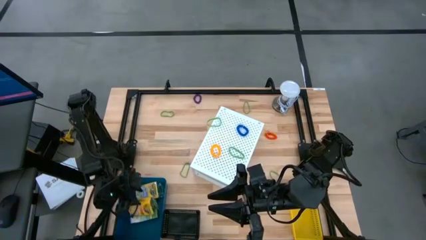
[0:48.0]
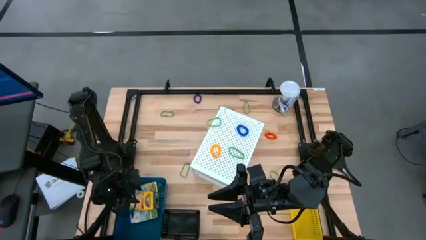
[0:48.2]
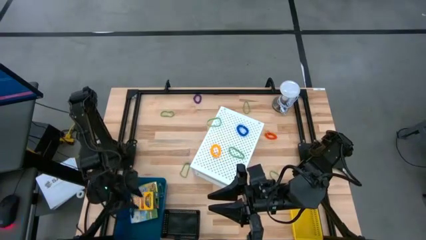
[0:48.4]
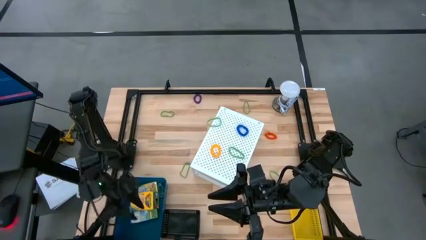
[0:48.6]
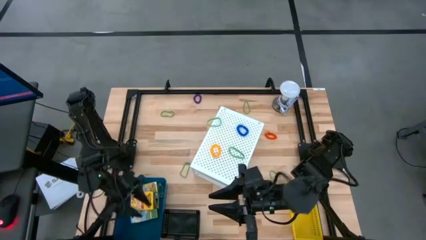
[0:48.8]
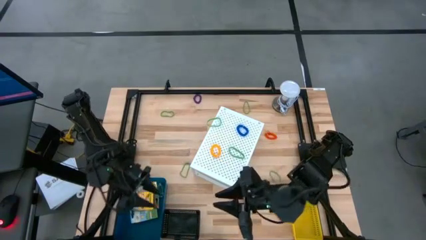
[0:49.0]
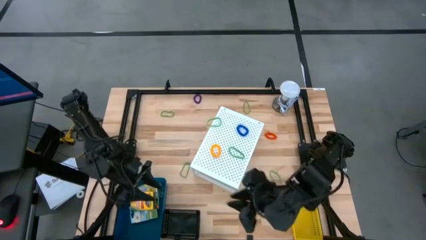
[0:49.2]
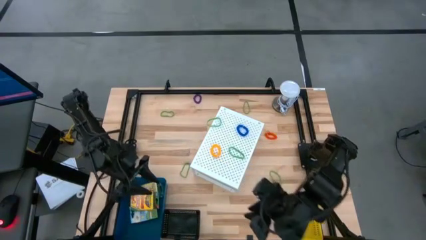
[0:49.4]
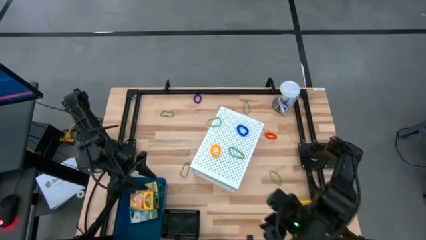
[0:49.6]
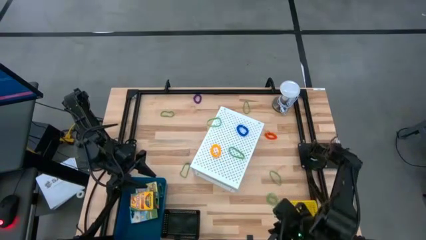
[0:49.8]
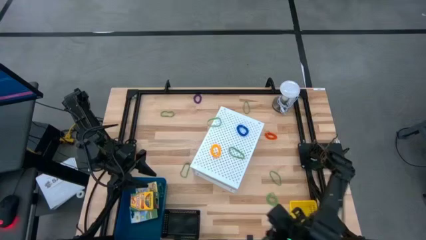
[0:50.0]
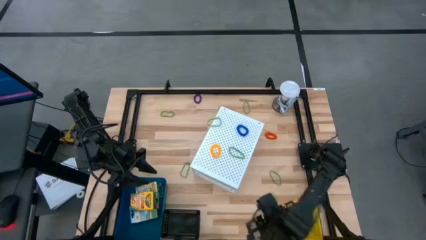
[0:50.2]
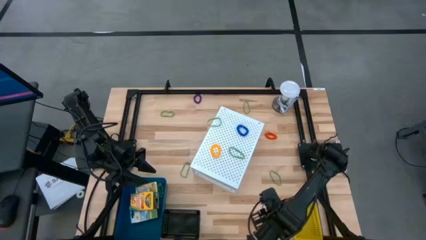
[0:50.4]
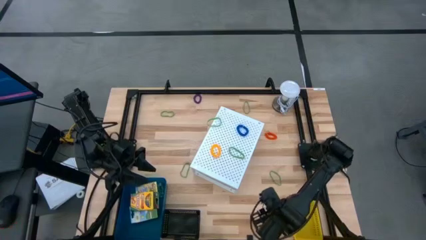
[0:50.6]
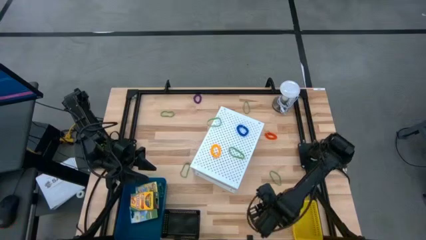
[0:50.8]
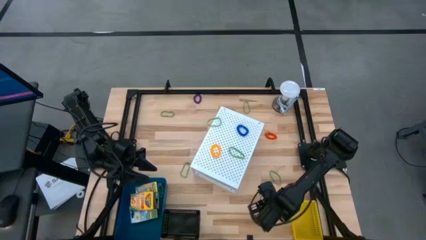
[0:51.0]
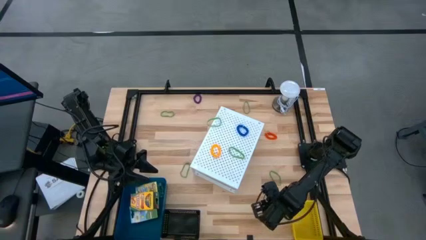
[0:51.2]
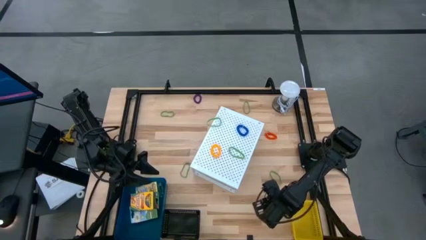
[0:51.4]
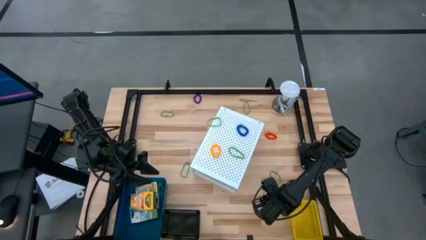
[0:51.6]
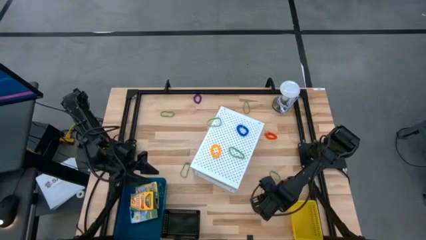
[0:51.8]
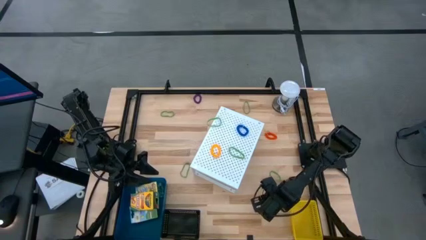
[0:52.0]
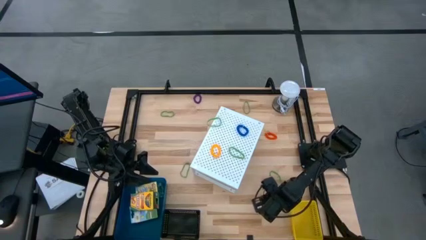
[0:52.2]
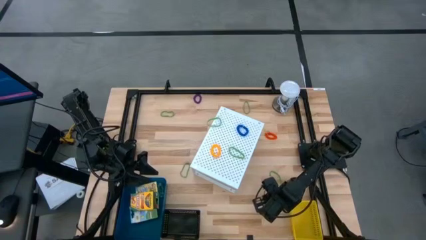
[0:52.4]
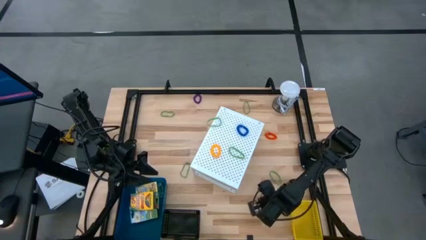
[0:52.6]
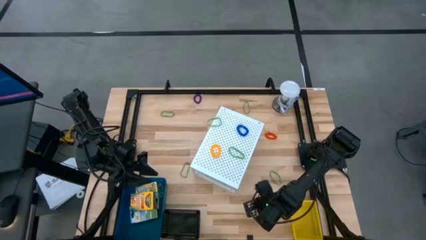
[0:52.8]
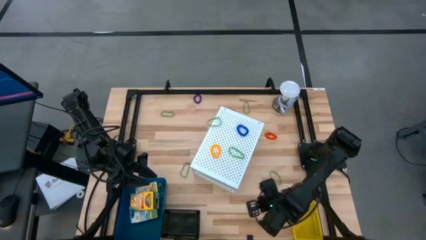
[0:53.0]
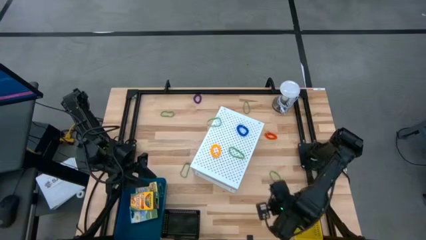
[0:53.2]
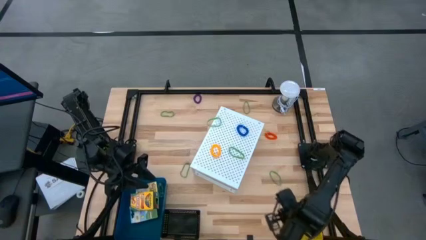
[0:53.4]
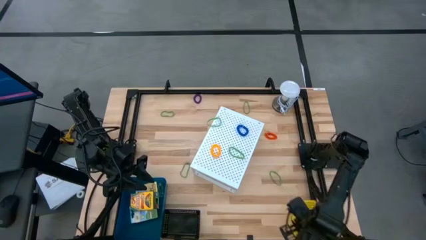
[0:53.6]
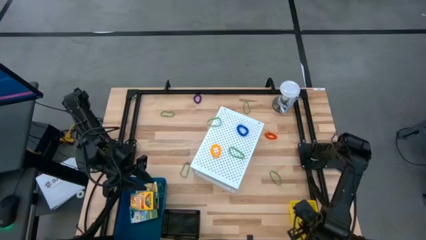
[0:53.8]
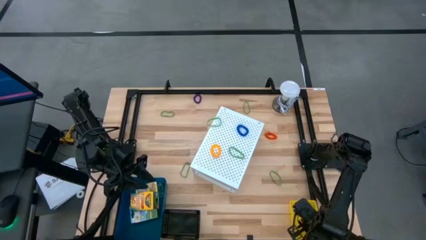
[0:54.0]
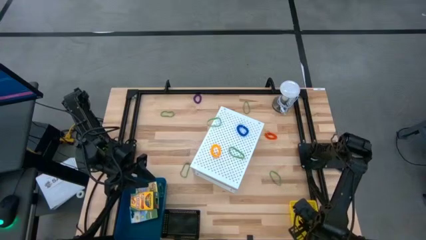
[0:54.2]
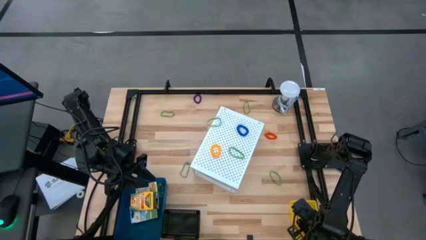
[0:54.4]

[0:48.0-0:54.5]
Task: Pick & Place Office Desk Supplies
Put the green spring keychain into the yellow bin

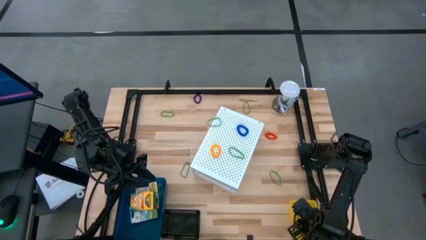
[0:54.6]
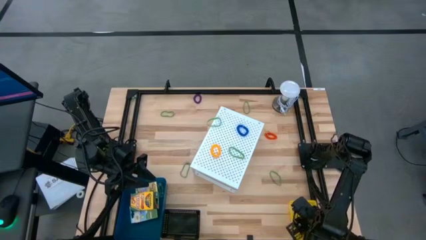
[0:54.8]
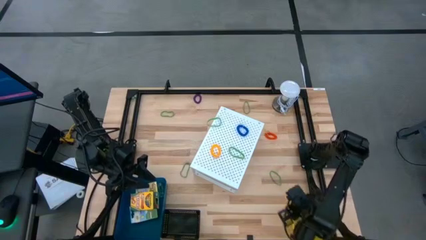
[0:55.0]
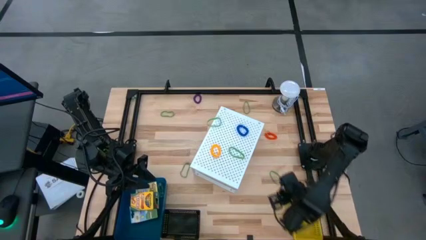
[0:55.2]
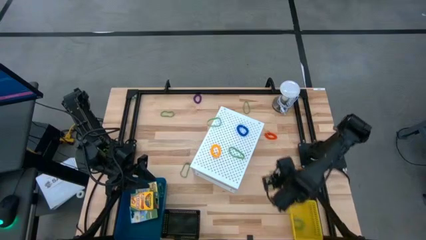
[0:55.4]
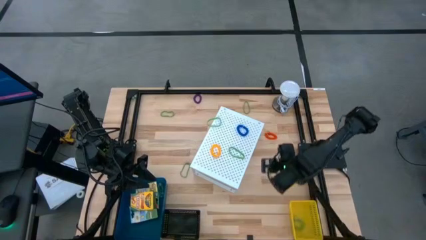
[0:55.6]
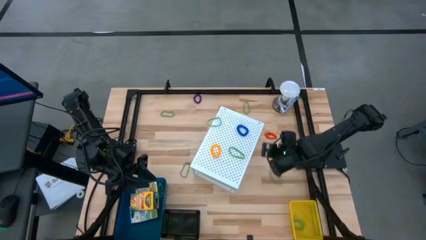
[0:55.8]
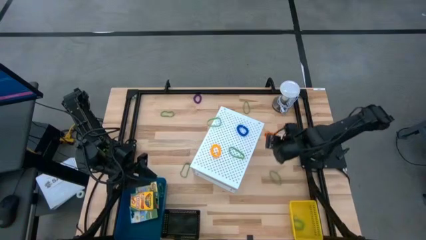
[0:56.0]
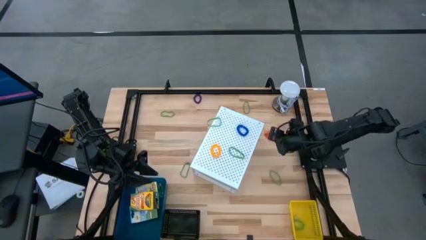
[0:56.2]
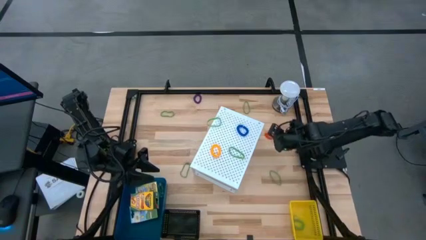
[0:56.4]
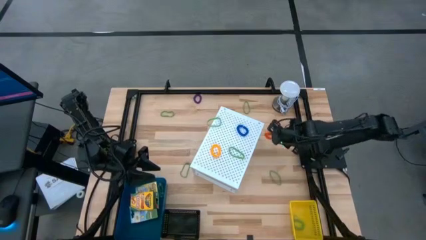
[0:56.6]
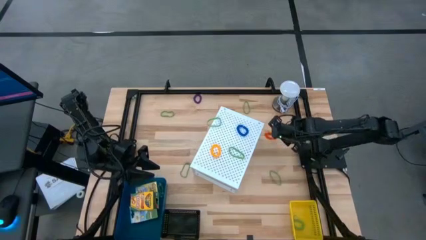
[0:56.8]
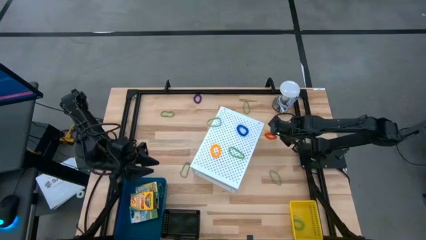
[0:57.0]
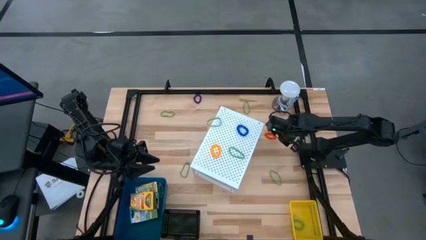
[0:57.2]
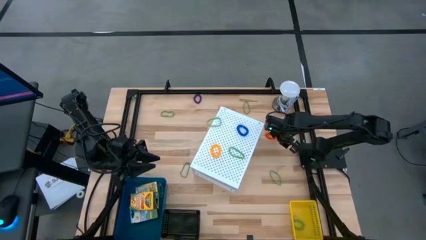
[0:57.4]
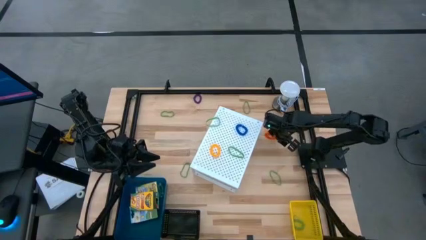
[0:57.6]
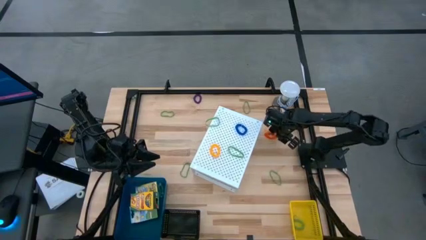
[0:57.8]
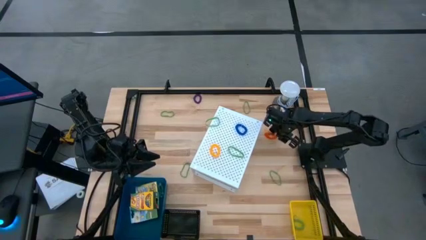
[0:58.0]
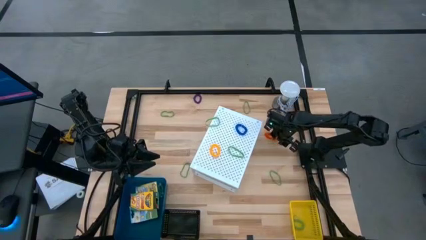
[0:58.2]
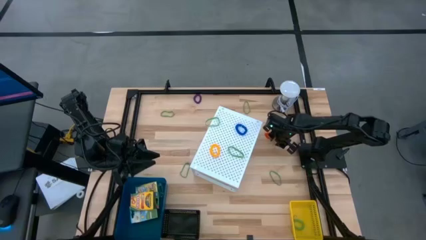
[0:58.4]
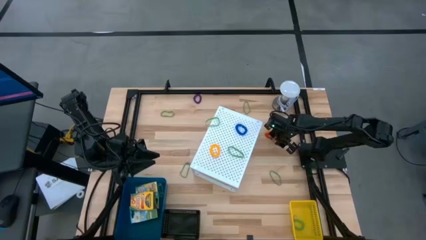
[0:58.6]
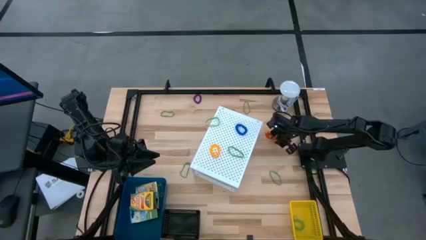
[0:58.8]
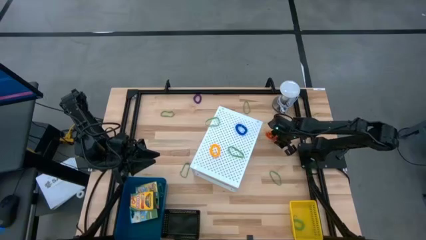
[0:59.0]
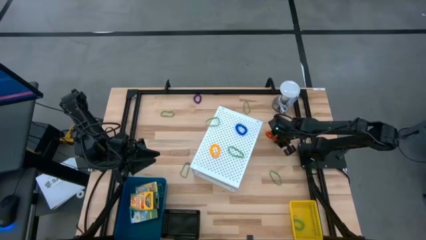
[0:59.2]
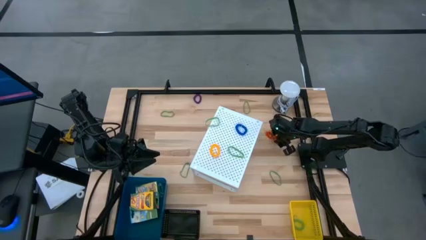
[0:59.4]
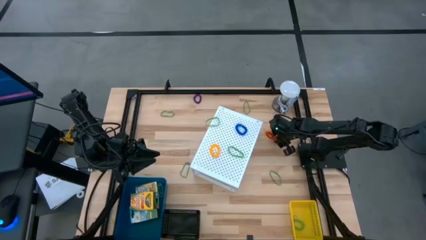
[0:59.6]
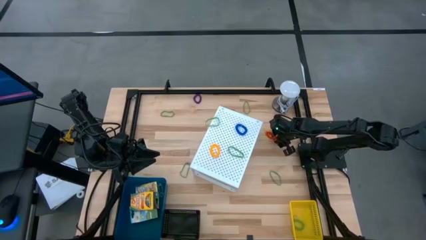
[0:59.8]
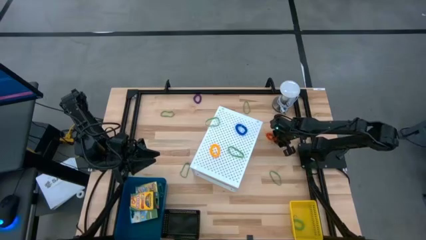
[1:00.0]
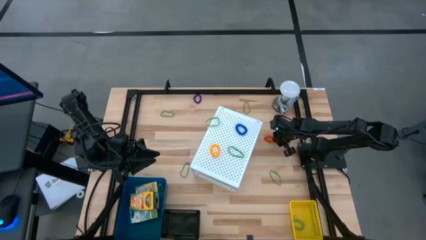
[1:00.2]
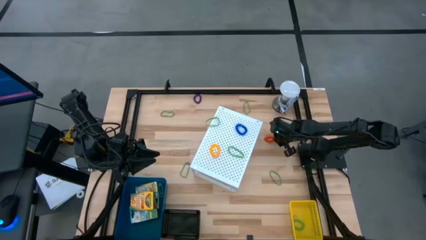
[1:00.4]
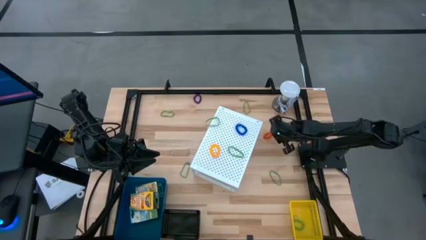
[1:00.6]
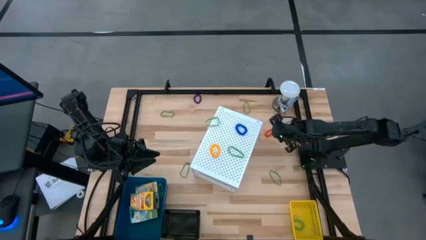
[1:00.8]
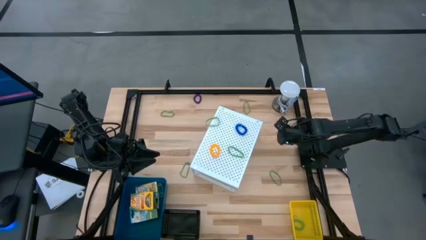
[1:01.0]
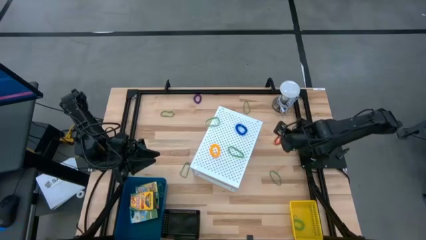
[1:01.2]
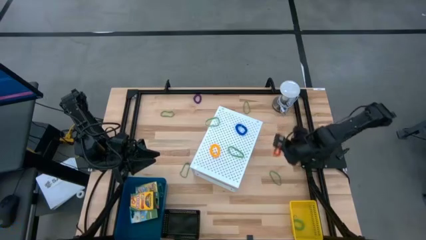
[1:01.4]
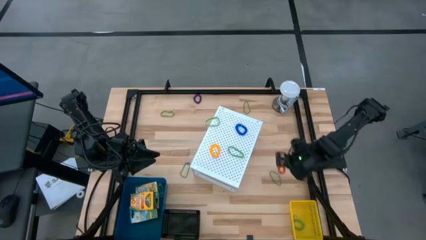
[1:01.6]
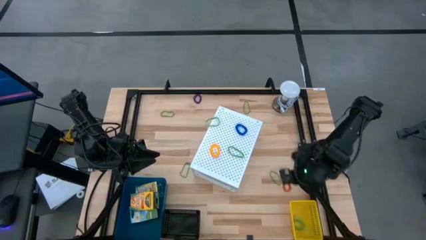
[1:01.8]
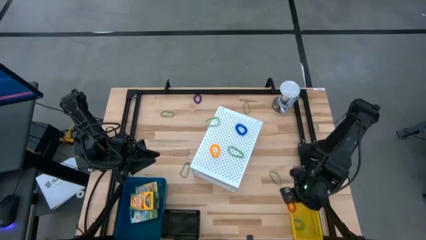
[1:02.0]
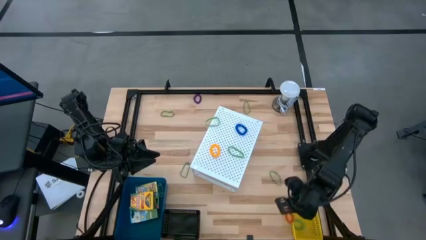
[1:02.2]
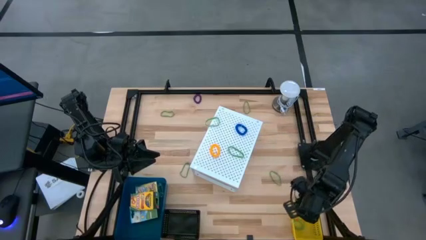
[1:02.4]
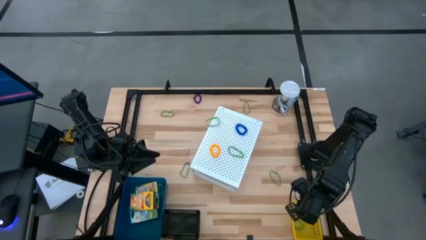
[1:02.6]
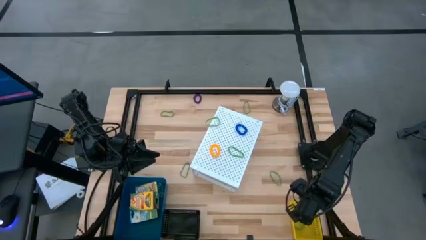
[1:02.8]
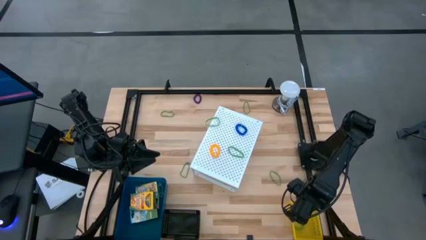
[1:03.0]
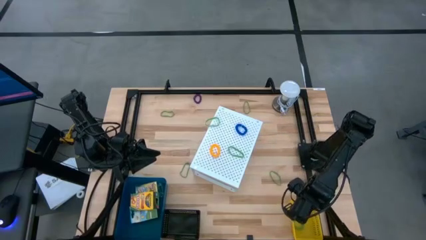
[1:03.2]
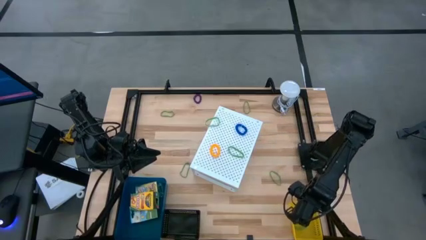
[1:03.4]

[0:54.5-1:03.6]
Put the red orange spring keychain into the yellow bin
